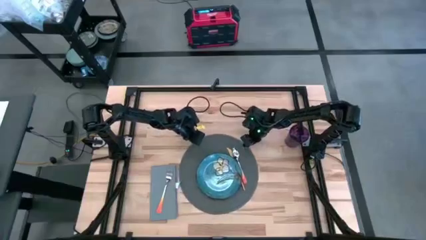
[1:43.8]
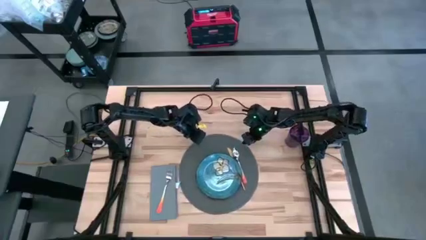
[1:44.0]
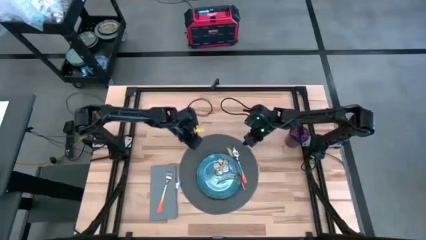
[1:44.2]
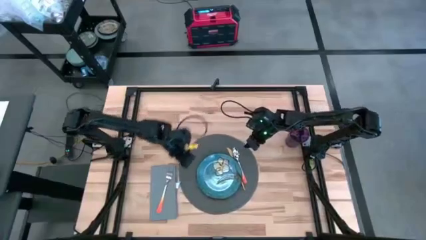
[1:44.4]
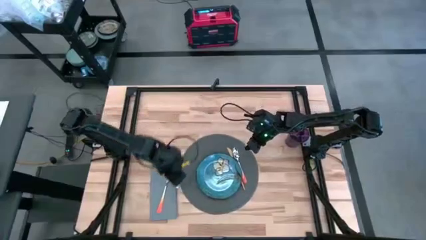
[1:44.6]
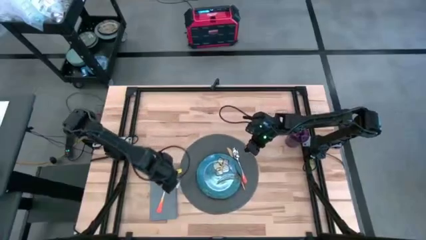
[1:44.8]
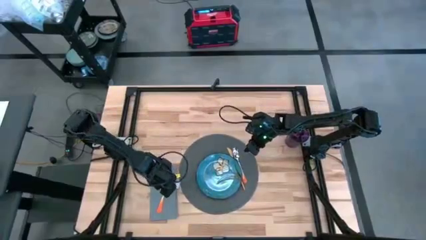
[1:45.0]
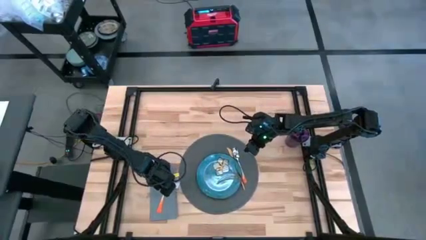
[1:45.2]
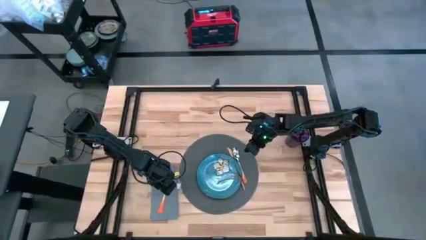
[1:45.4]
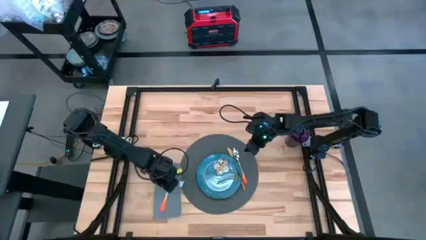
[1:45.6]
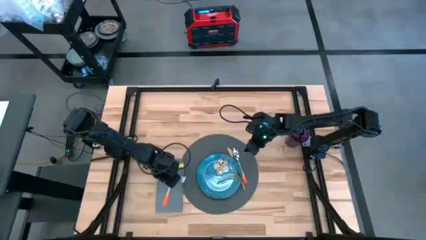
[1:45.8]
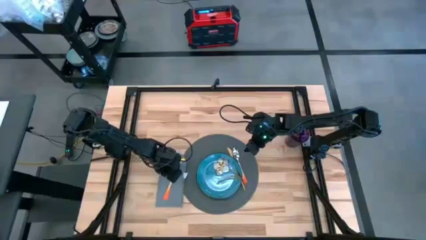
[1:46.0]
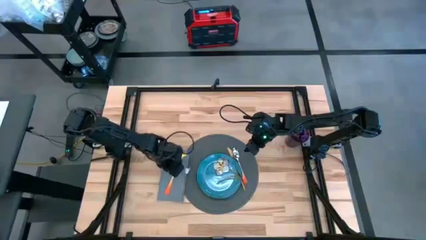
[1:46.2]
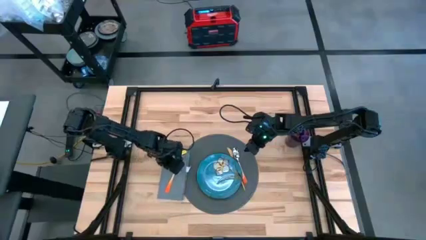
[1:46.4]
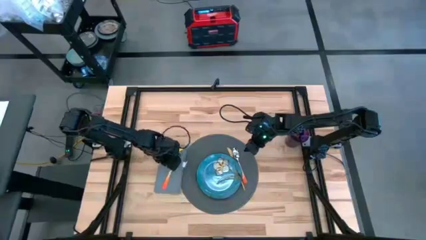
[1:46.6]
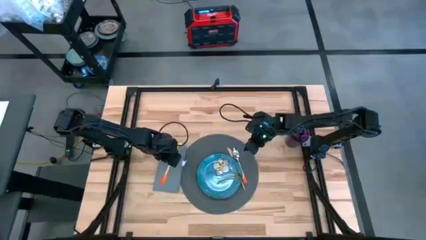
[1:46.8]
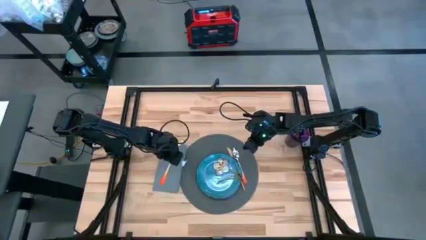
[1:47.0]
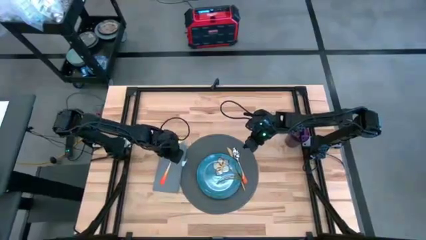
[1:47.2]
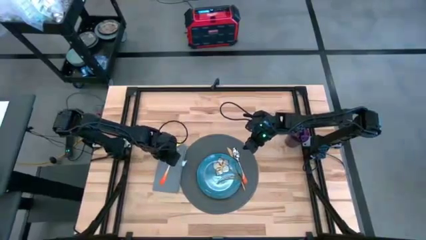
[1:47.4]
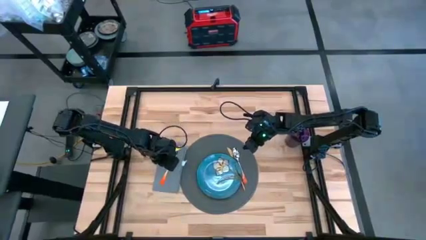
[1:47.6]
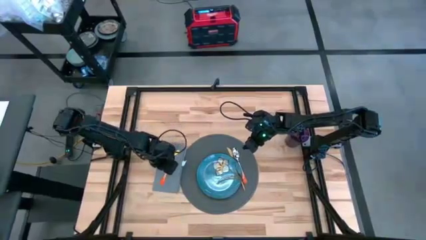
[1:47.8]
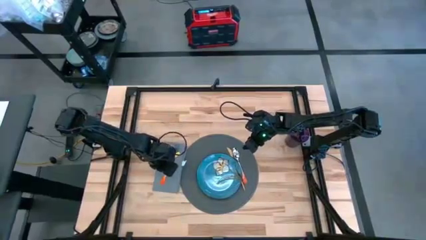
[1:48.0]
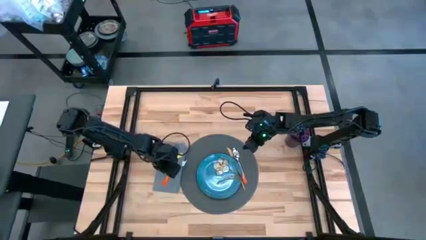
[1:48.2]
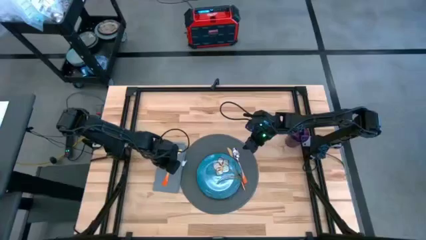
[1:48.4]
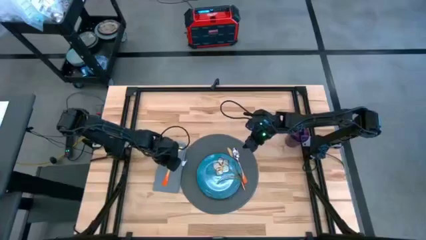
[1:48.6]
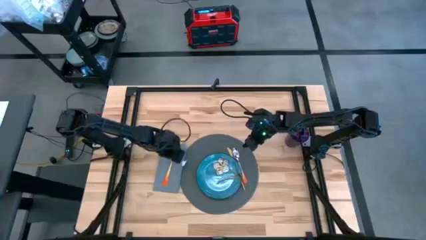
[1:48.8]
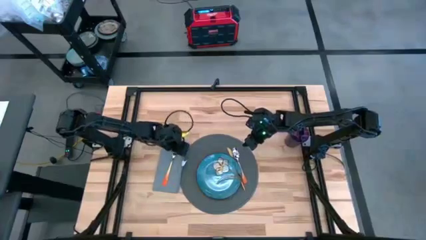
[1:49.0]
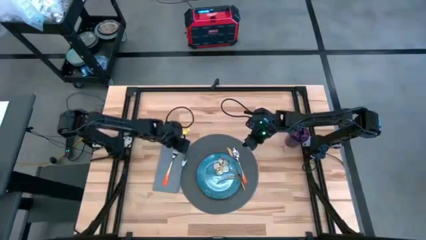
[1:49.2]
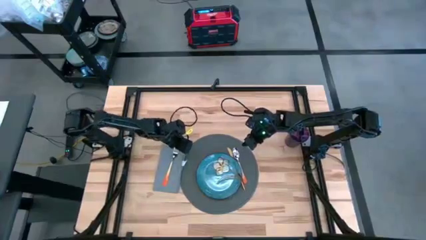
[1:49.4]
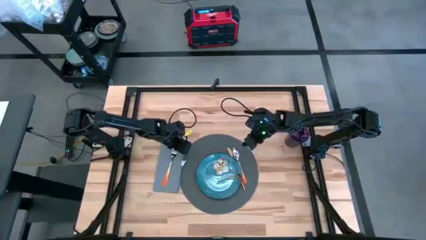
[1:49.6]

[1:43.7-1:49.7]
Task: Set table place
Adjust the gray table napkin

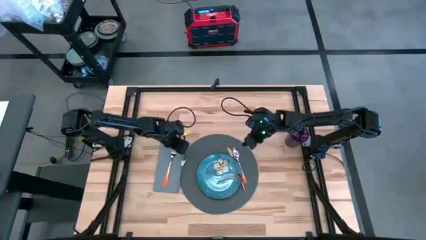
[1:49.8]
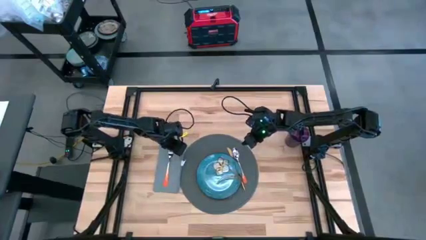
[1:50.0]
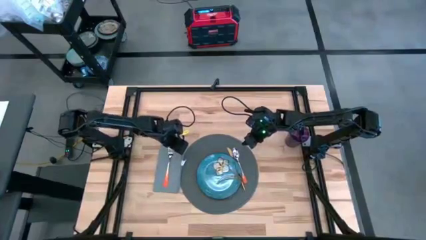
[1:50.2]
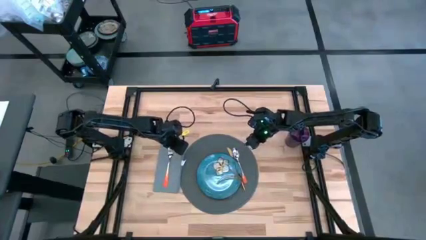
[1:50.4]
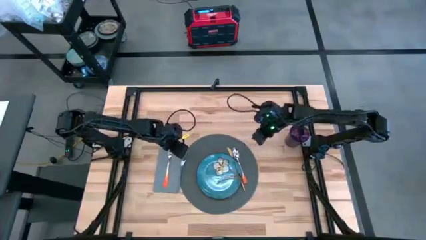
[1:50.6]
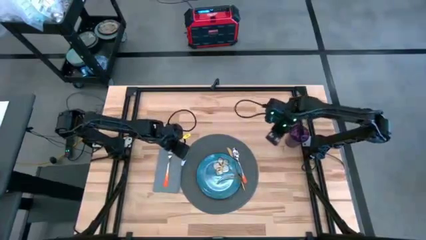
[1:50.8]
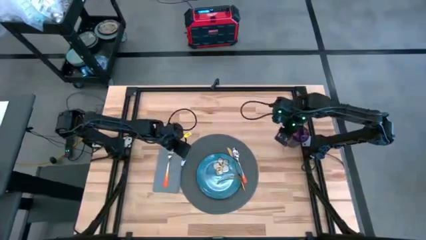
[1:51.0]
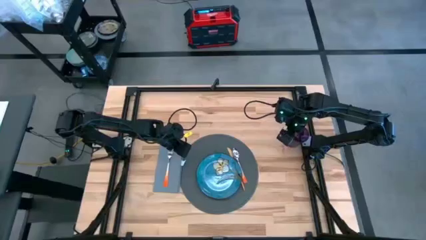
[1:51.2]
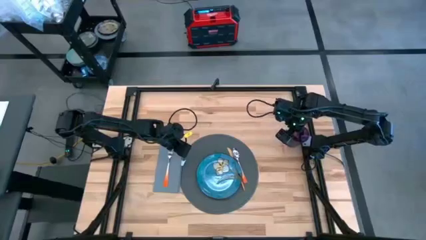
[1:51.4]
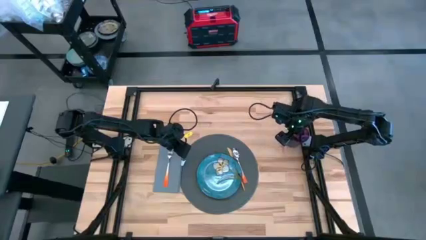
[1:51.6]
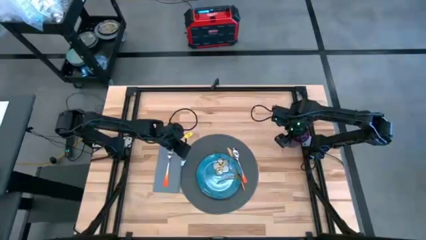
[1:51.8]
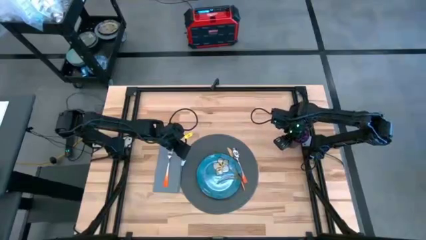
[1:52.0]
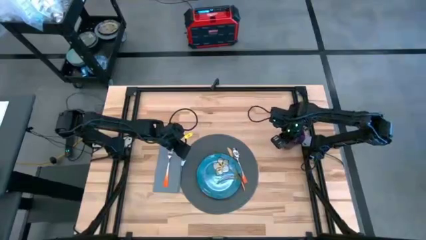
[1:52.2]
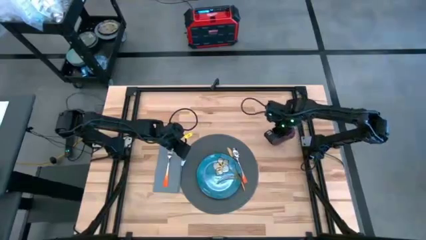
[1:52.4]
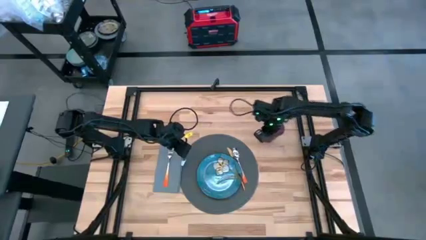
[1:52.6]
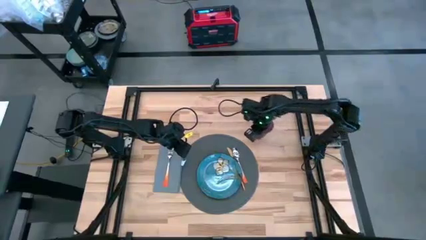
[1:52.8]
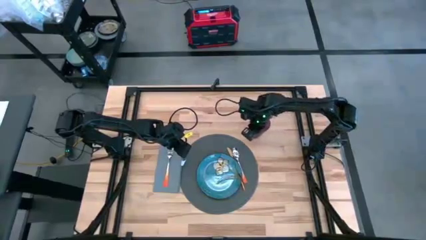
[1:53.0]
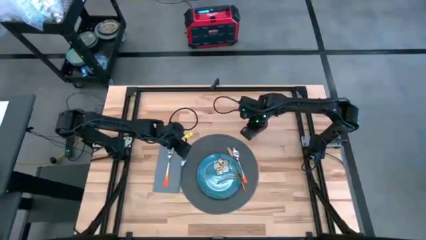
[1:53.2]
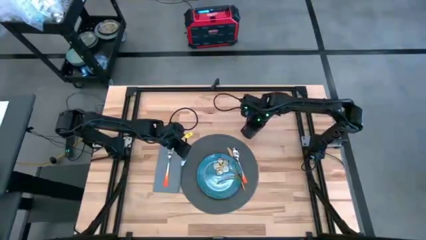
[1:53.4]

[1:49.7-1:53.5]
Move the purple cup to the top right of the gray table mat

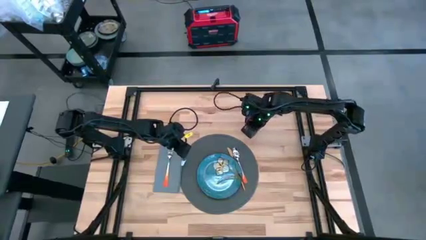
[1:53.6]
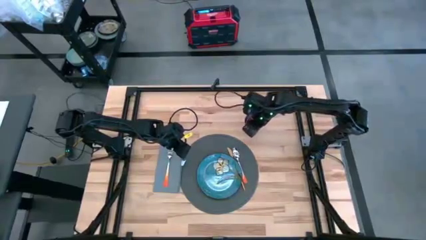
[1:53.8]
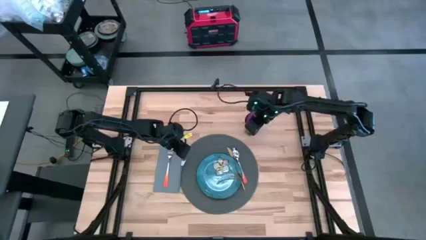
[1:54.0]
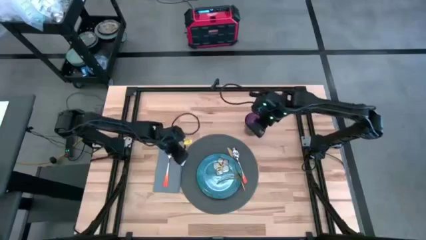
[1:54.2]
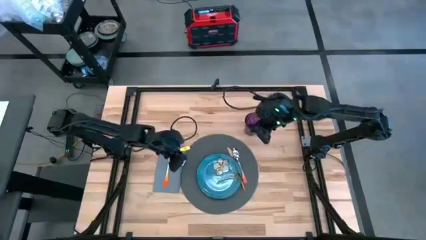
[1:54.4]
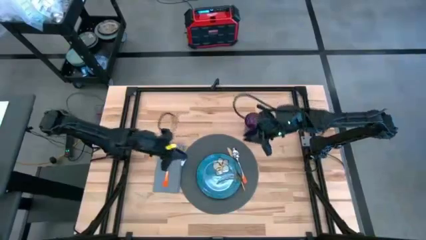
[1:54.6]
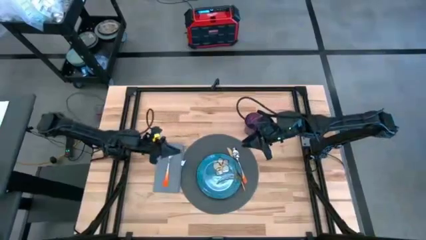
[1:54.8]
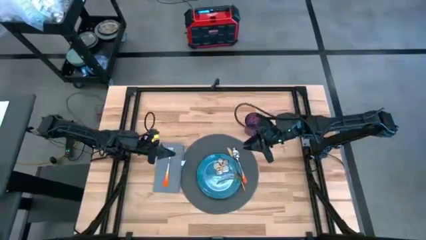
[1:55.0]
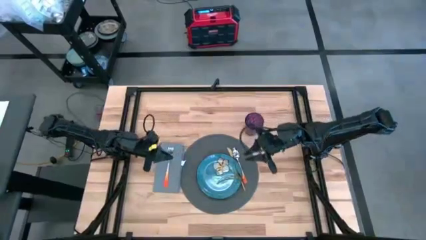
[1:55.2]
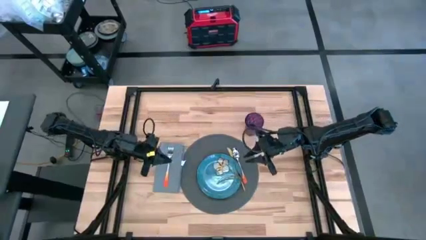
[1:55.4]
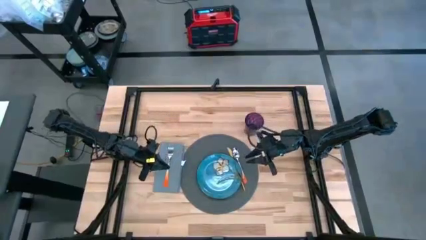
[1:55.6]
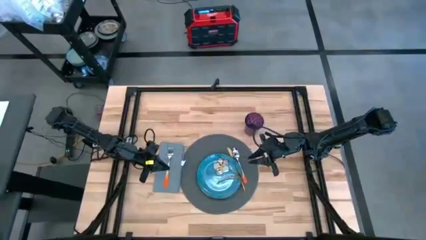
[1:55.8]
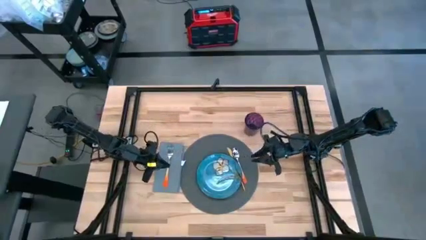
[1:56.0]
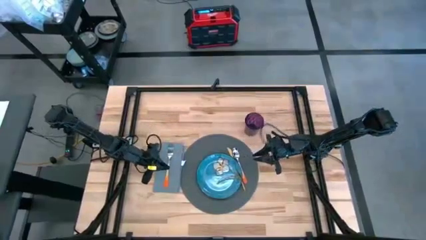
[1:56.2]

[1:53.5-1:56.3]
Return to Home Position

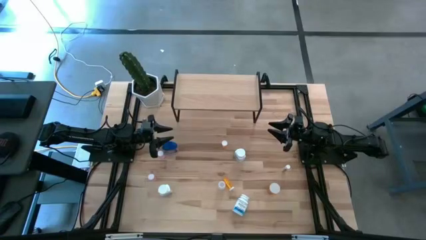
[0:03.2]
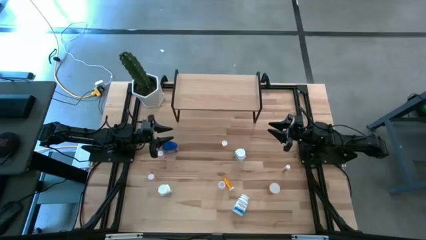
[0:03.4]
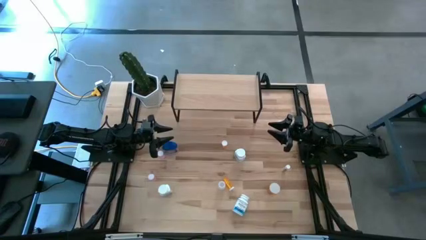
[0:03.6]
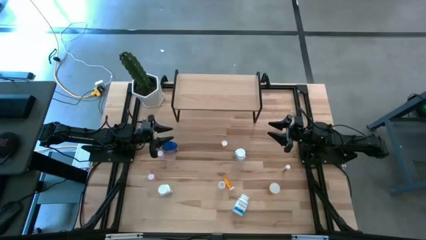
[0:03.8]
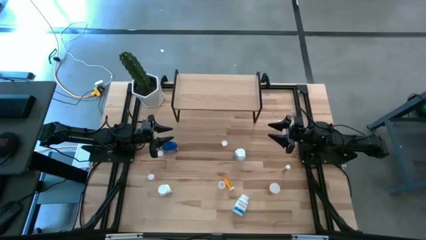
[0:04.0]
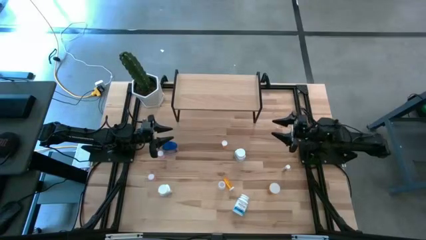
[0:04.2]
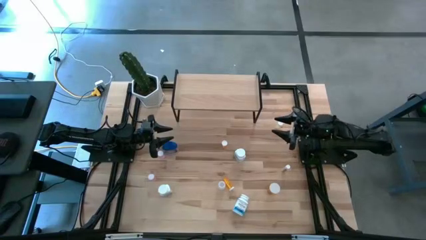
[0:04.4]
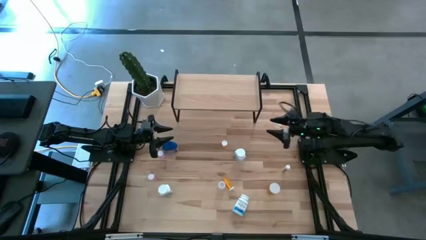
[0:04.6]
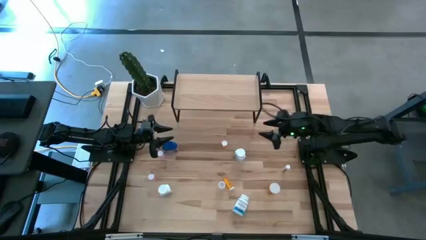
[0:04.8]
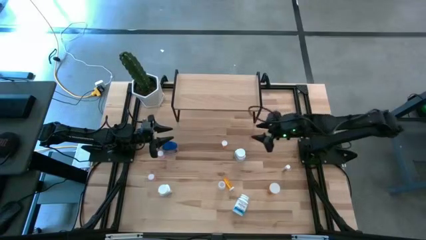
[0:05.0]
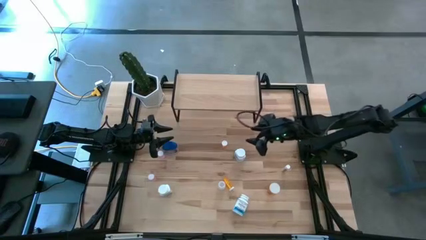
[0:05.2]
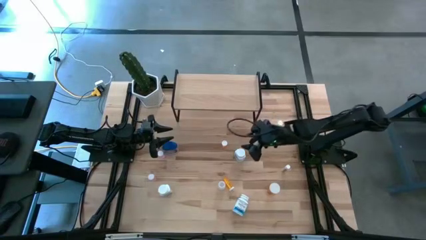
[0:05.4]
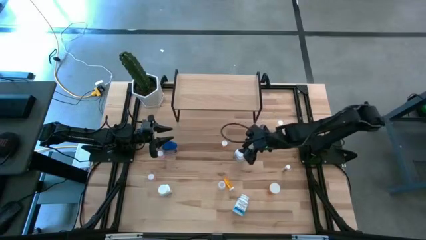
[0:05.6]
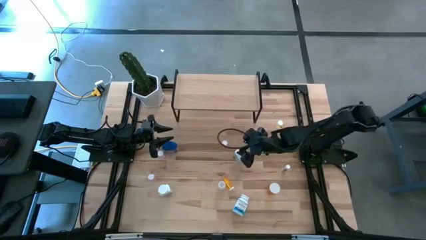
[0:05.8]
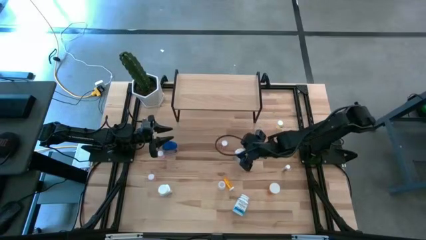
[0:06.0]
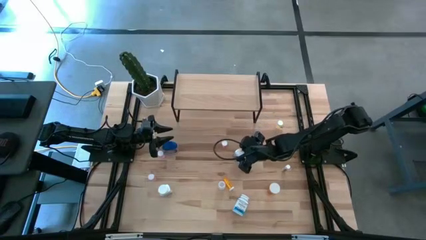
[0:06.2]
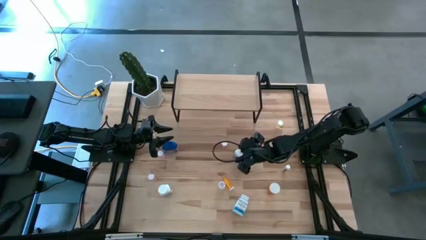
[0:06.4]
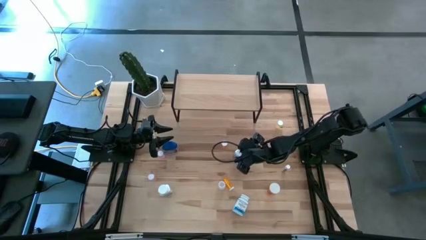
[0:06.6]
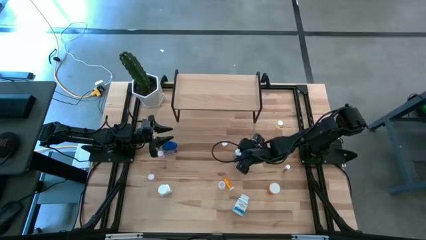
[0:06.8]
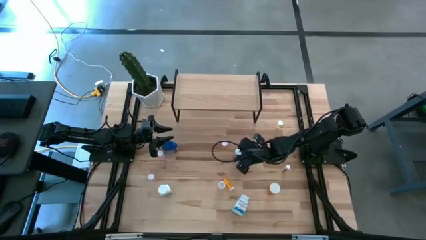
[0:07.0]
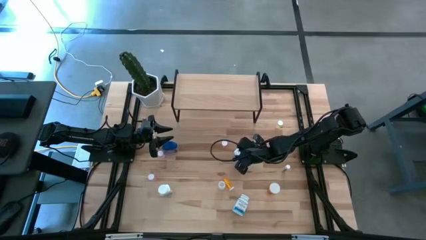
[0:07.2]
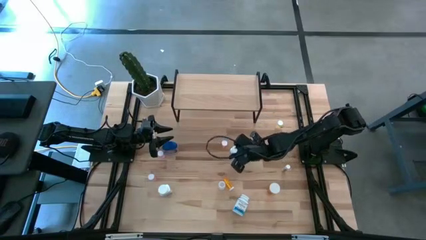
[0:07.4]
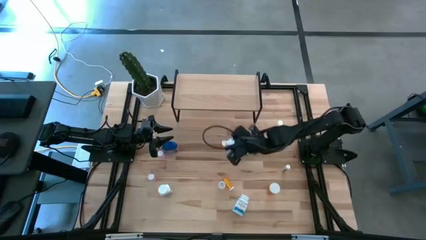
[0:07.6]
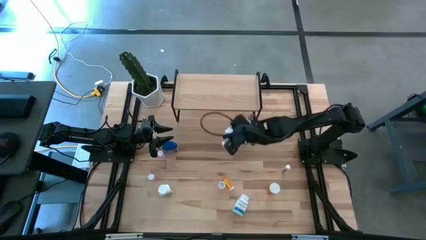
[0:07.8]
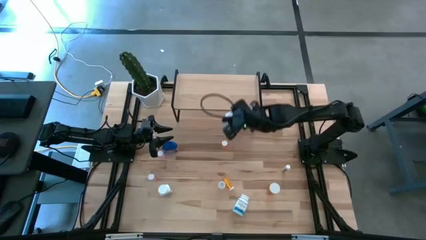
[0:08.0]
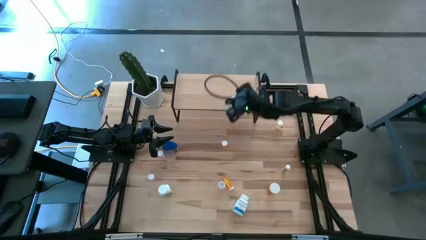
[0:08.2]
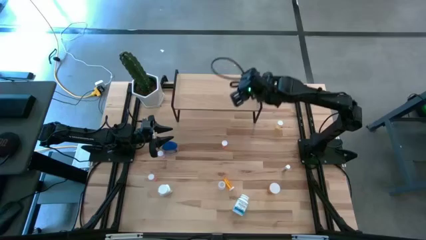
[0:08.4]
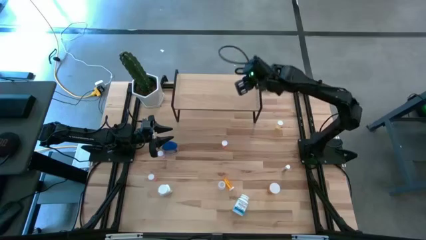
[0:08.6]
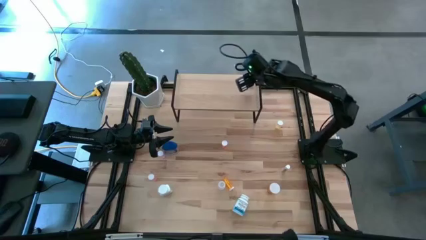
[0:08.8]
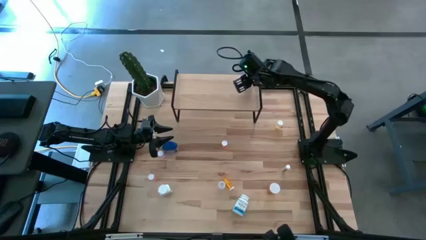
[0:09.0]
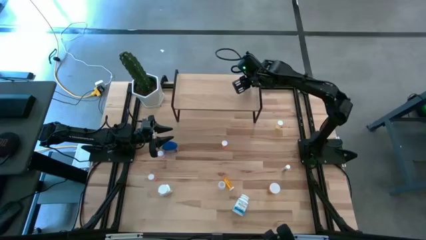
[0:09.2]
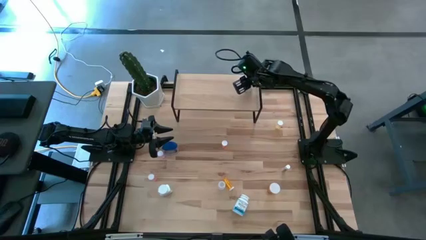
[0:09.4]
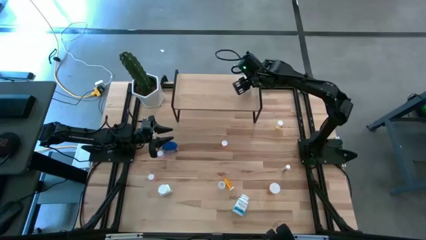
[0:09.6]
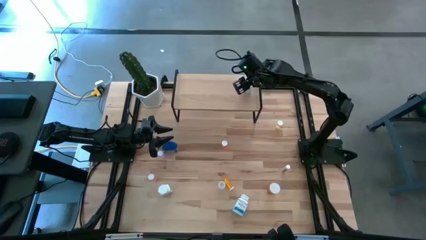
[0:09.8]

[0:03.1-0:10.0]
Task: Pick and place medicine bottles onto shelf by color
Put the top white large pill bottle on the shelf
